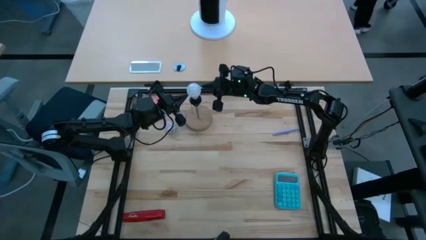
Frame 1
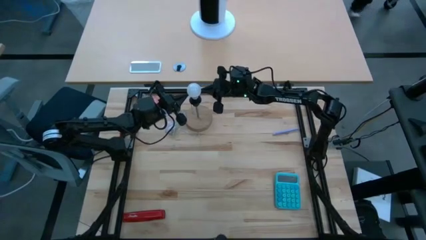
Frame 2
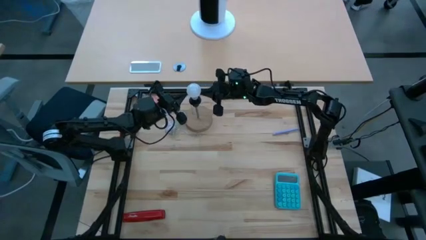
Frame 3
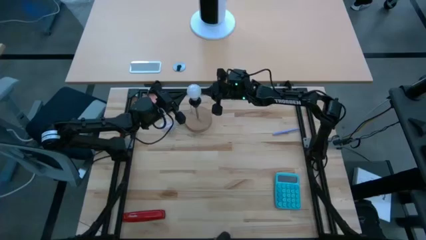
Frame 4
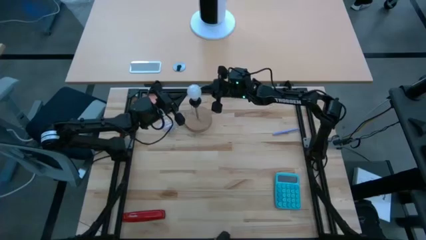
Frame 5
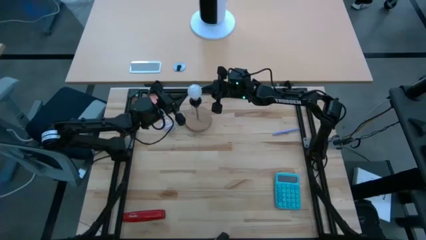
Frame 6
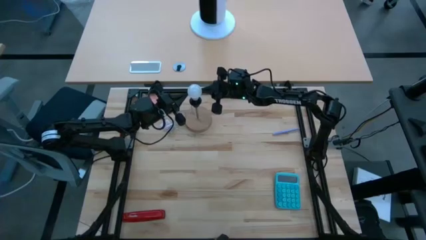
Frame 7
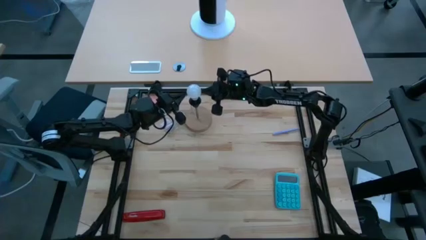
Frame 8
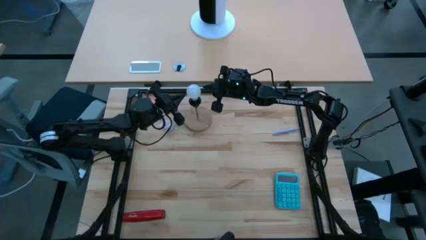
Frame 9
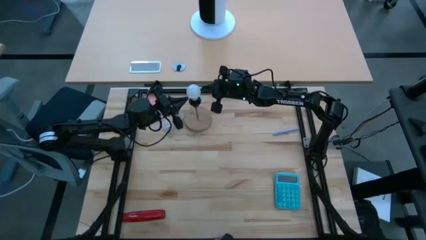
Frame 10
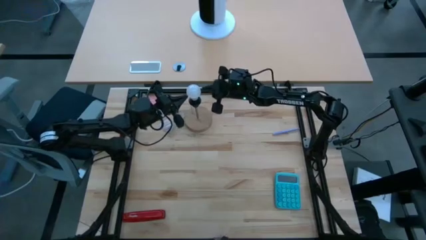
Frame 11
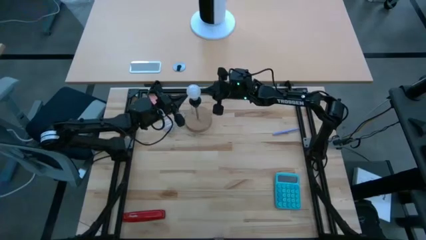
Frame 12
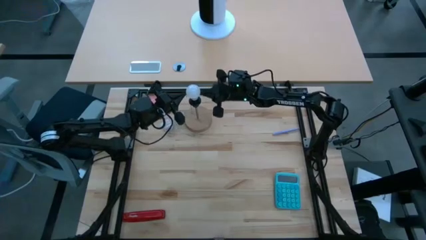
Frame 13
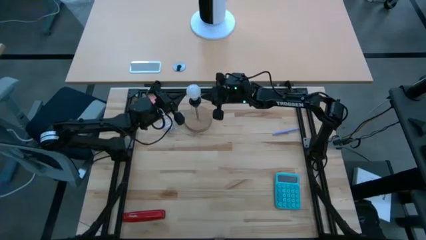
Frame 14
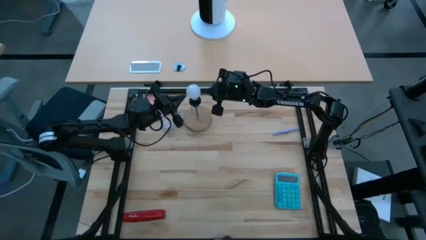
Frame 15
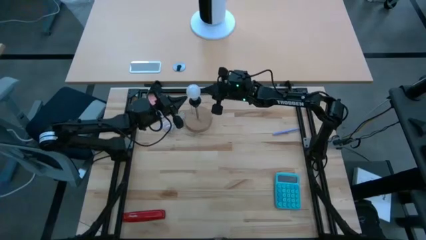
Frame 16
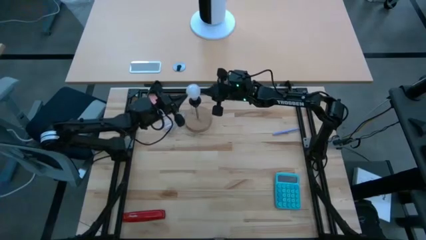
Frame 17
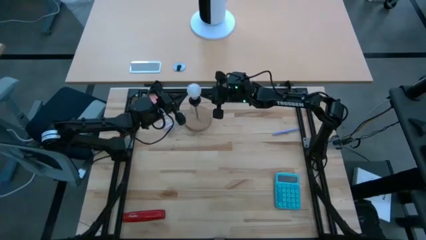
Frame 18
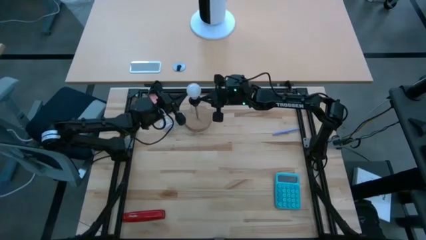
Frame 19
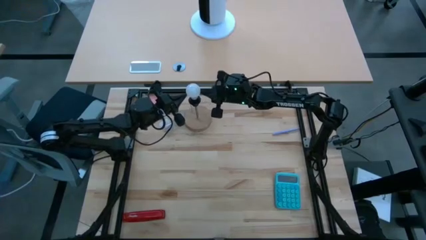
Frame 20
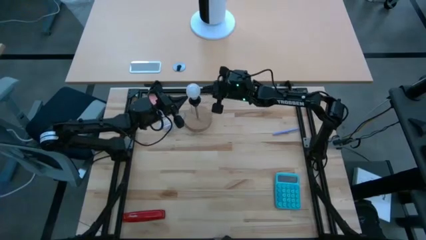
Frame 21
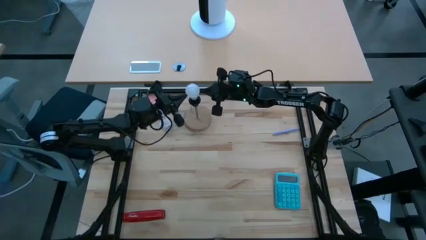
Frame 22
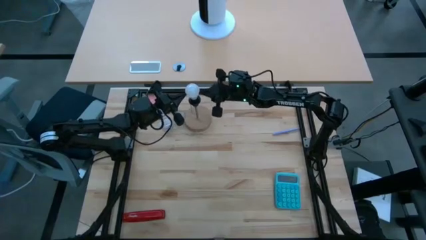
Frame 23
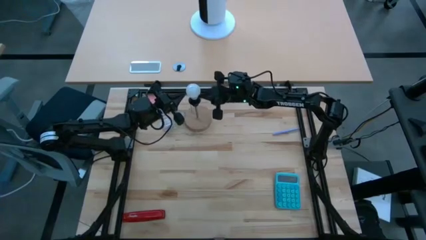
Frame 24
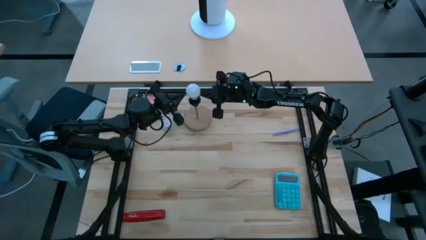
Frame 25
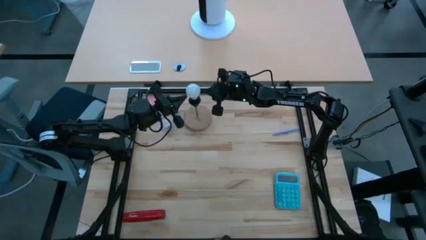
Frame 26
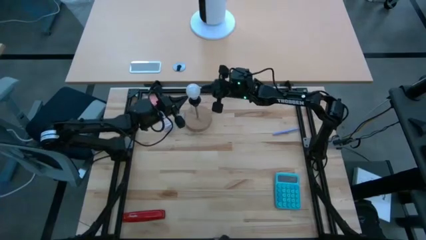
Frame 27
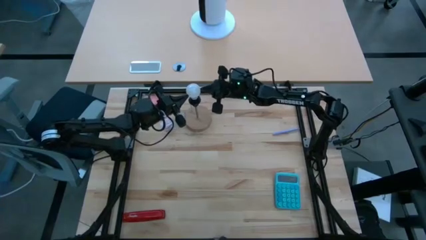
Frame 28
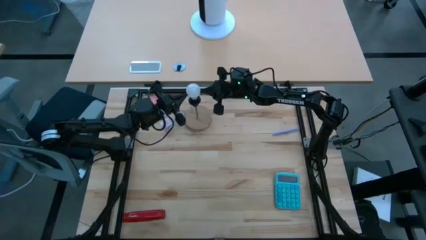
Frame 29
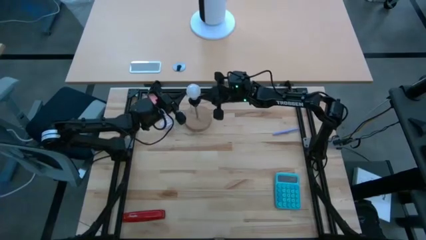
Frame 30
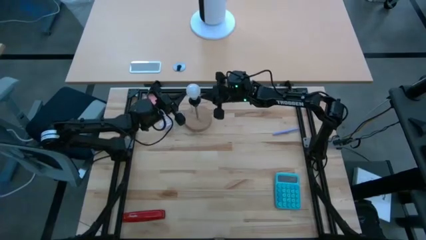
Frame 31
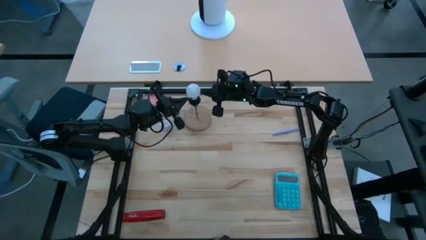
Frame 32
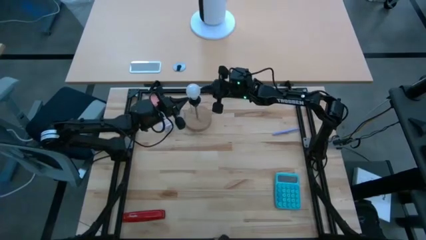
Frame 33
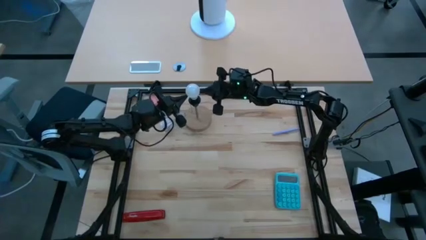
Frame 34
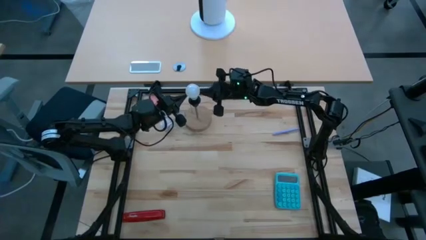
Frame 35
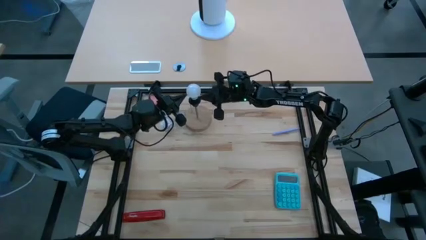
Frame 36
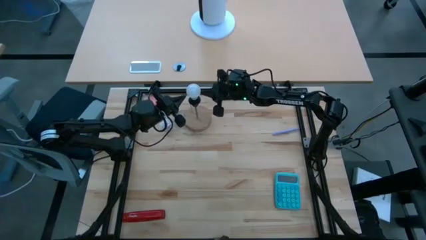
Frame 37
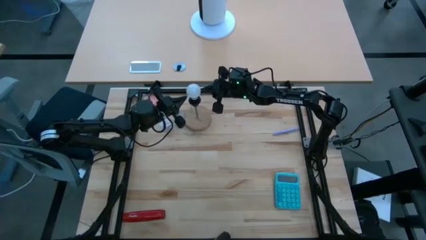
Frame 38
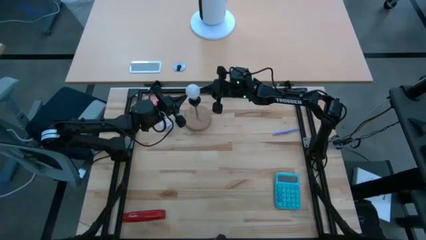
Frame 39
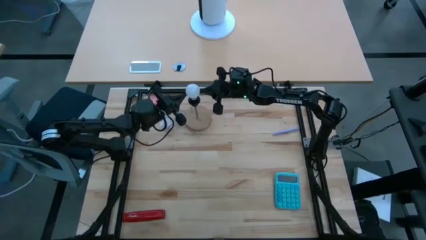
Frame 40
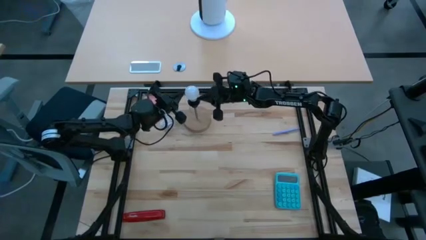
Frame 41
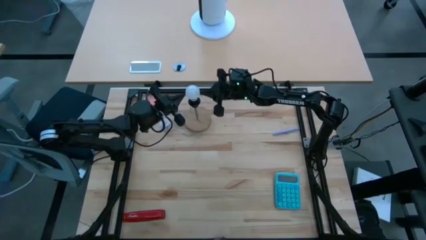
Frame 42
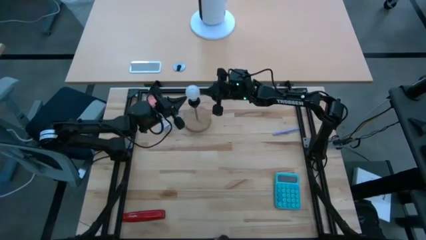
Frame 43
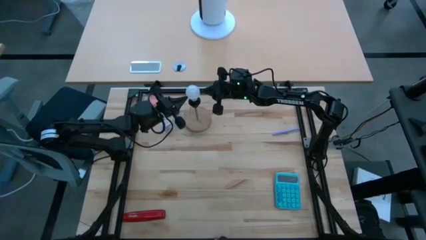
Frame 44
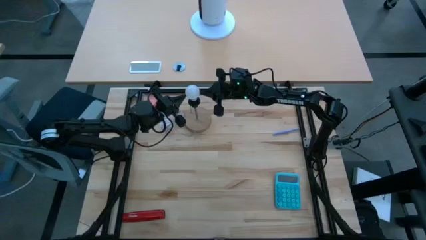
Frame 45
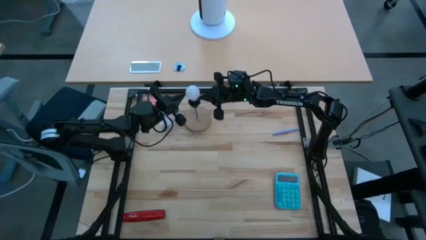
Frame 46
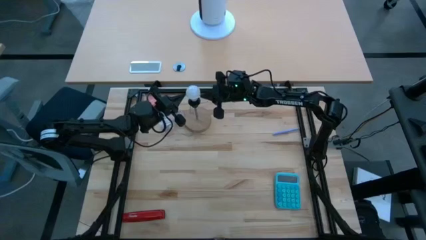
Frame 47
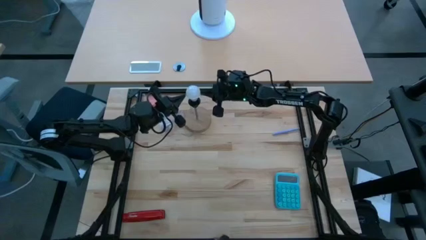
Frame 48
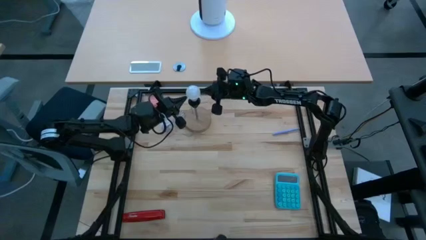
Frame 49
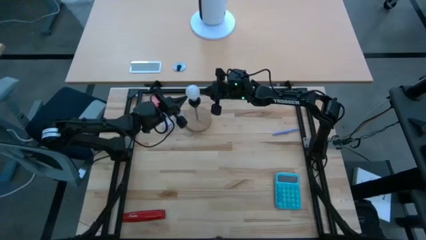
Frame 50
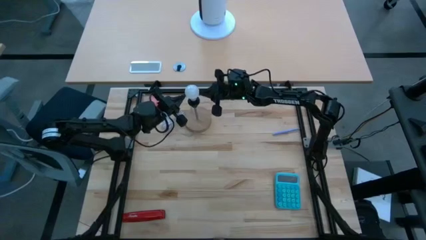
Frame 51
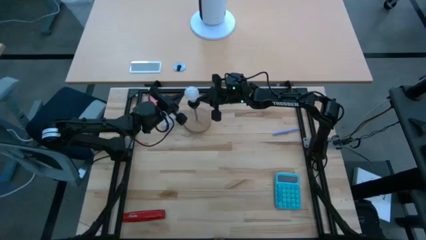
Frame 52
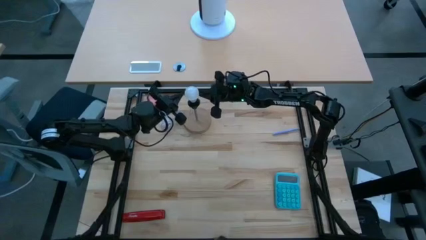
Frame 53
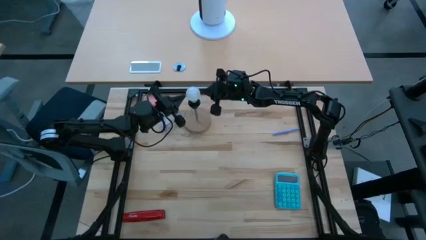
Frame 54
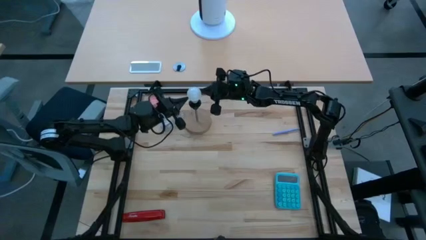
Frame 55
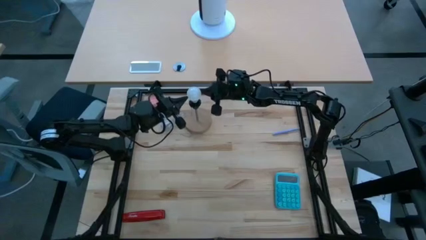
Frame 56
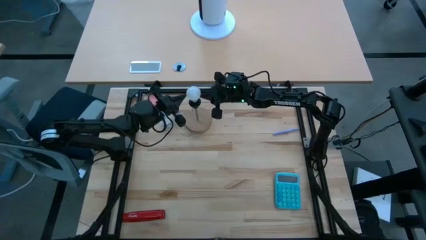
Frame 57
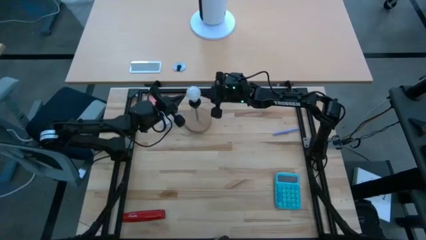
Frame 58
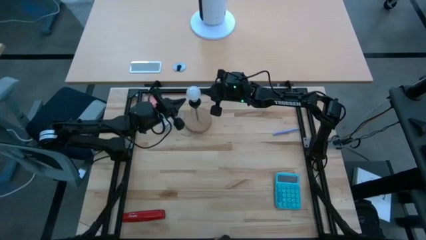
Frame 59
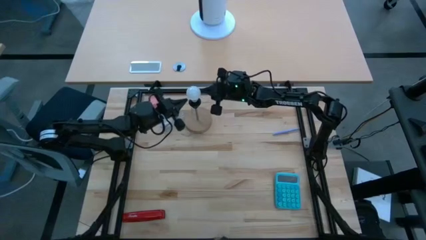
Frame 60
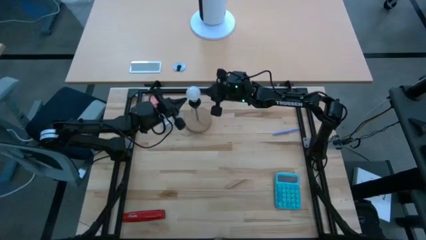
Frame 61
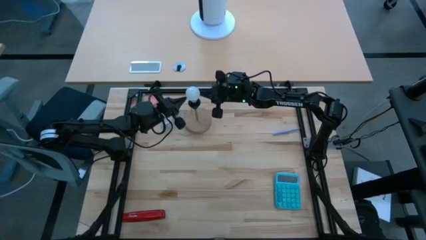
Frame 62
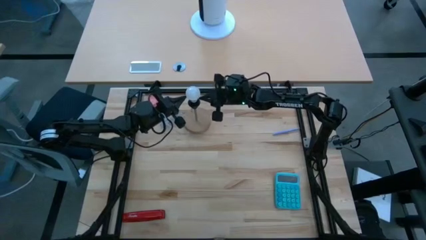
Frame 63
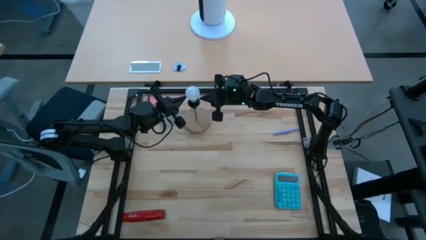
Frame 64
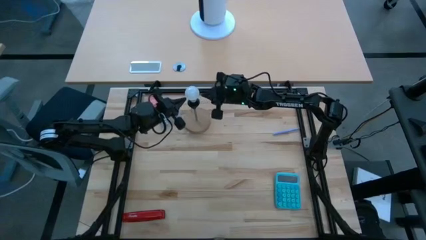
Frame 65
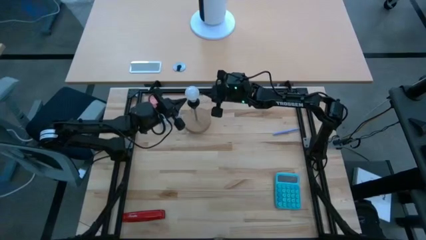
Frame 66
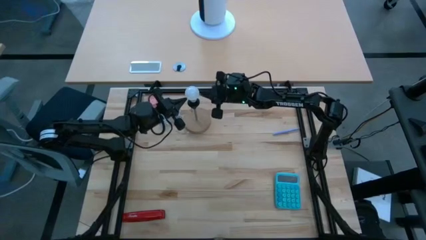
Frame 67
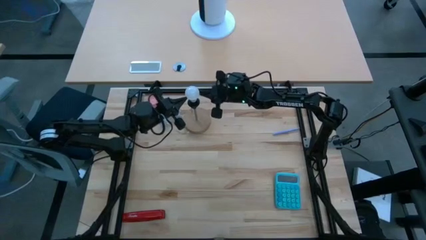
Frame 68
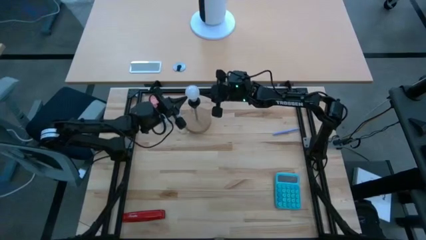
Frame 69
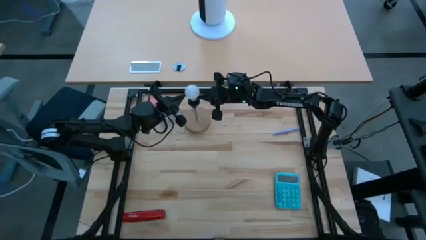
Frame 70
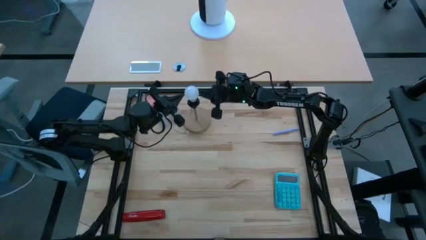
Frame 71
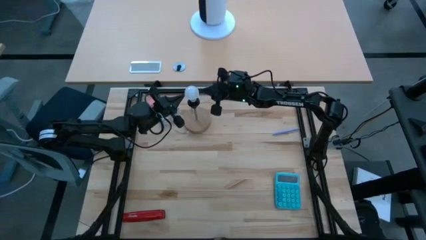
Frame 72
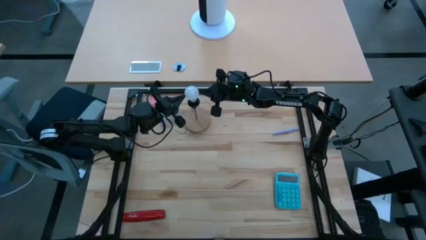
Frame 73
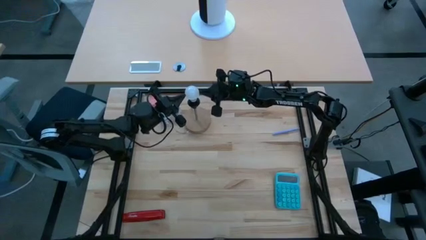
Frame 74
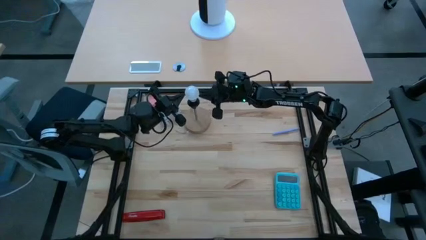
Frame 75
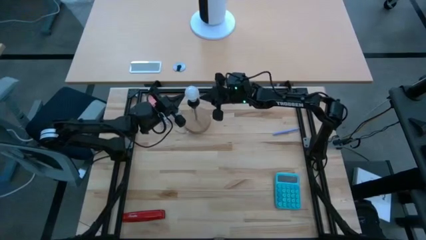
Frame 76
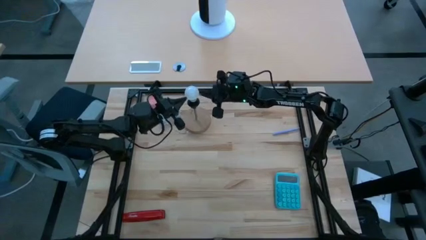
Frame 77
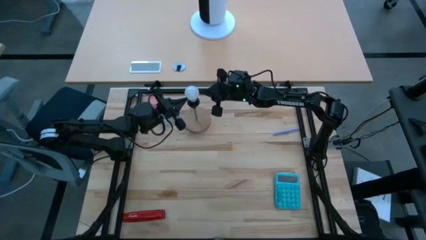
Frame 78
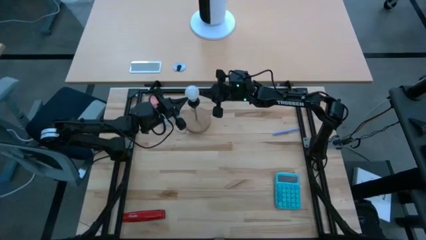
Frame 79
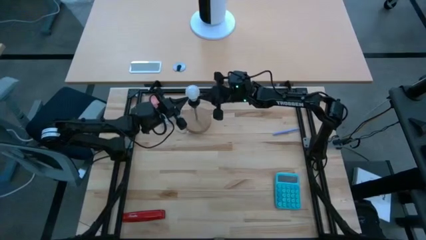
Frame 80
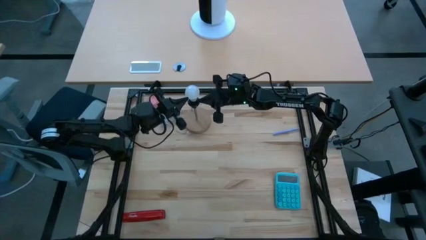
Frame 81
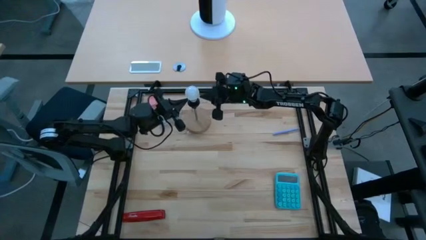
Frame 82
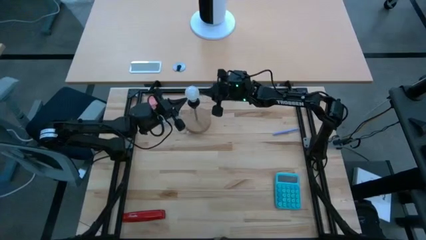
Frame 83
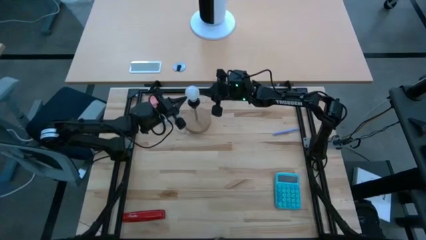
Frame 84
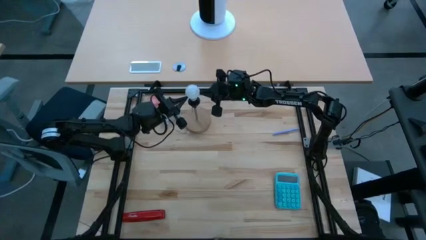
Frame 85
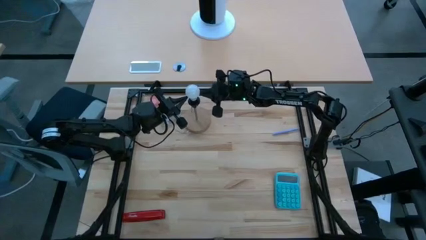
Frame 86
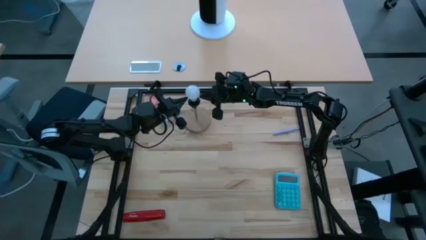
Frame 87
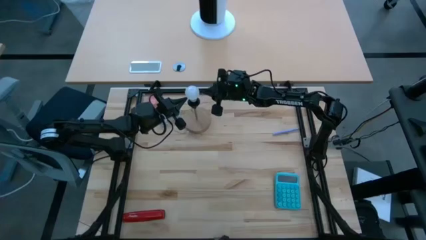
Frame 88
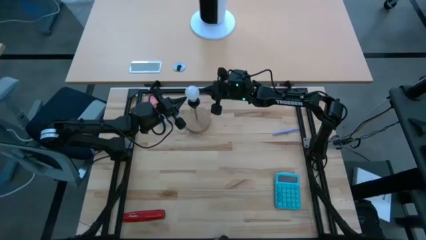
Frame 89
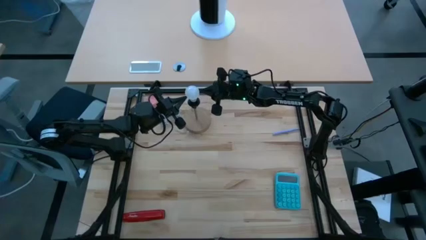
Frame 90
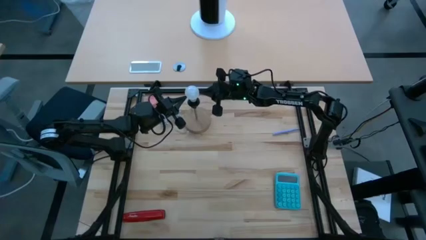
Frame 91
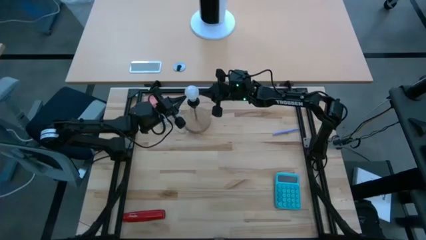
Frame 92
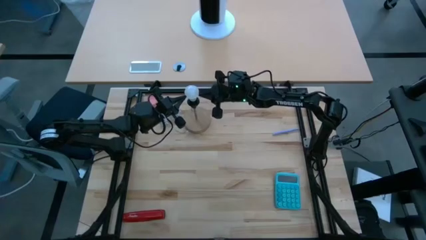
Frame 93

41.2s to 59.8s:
Task: Screw lightbulb
Insert the lightbulb into the wooden table lamp
